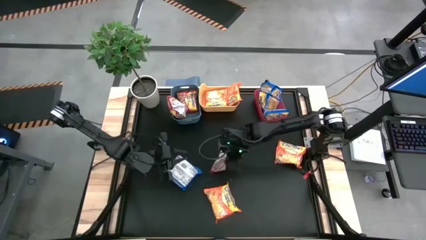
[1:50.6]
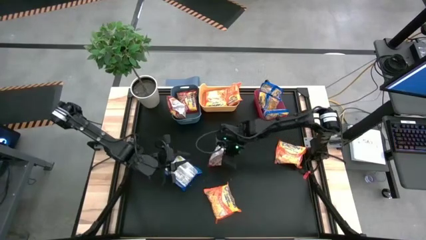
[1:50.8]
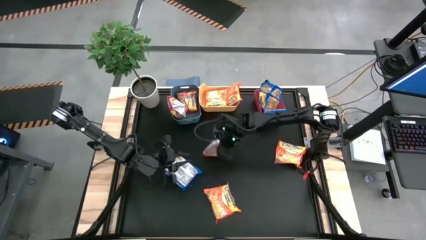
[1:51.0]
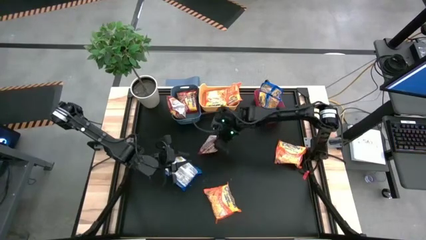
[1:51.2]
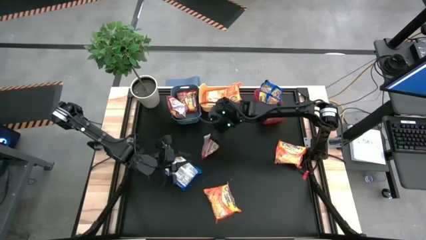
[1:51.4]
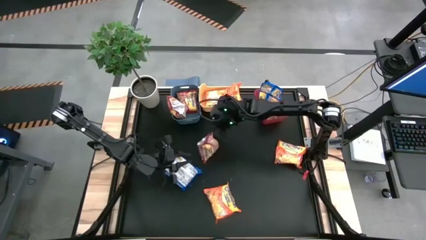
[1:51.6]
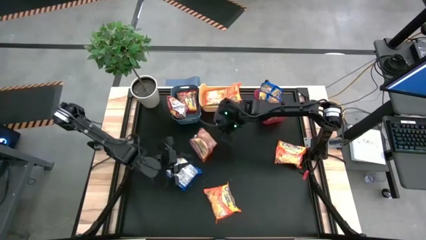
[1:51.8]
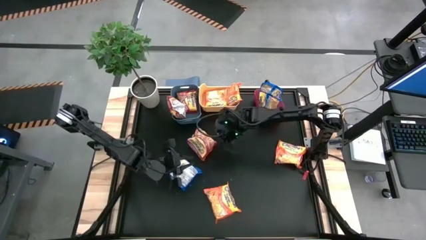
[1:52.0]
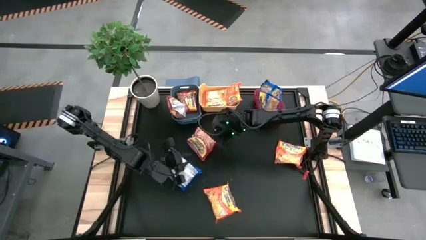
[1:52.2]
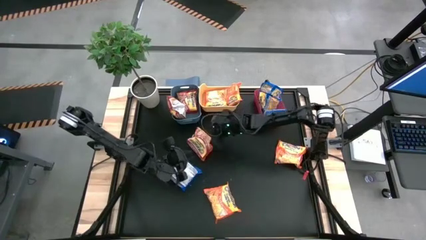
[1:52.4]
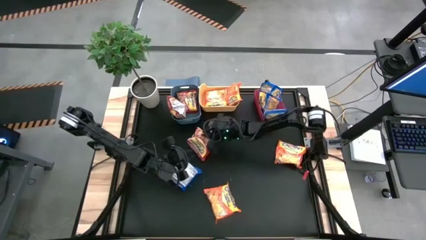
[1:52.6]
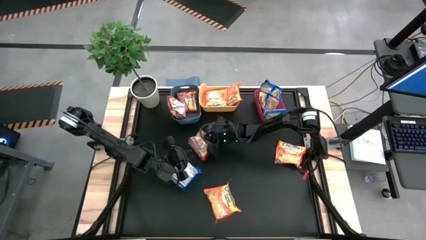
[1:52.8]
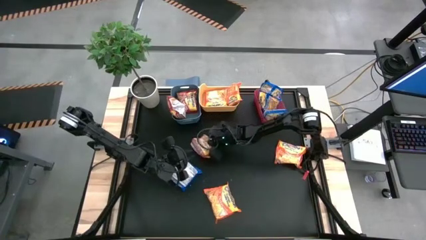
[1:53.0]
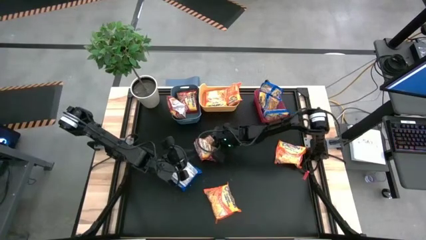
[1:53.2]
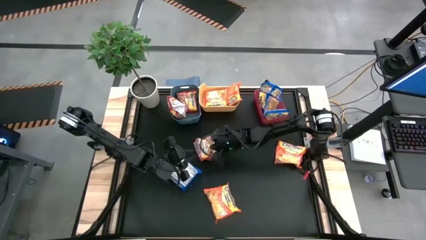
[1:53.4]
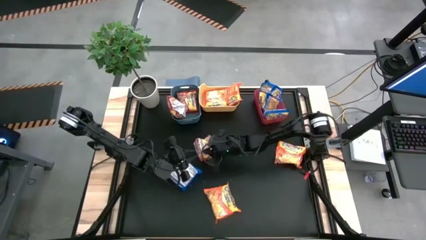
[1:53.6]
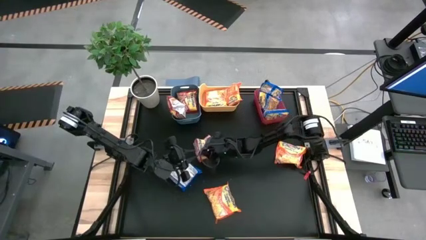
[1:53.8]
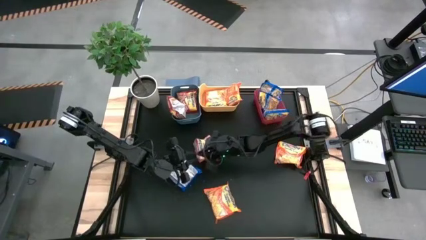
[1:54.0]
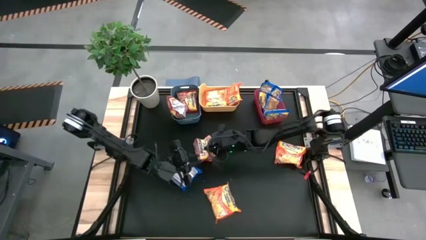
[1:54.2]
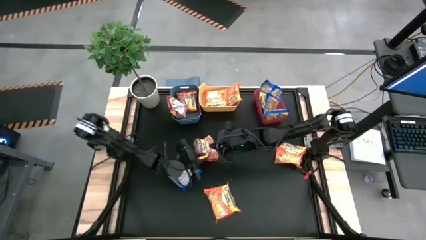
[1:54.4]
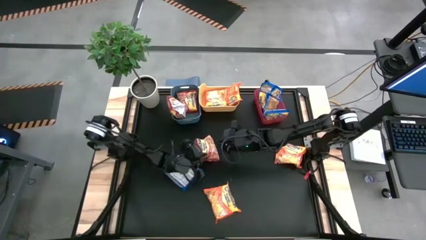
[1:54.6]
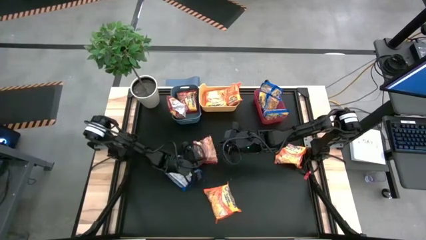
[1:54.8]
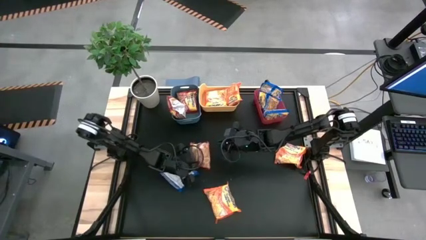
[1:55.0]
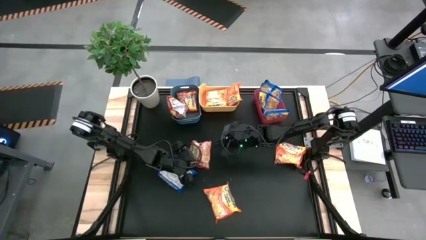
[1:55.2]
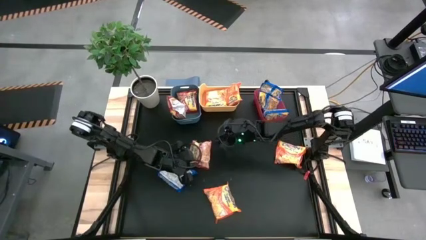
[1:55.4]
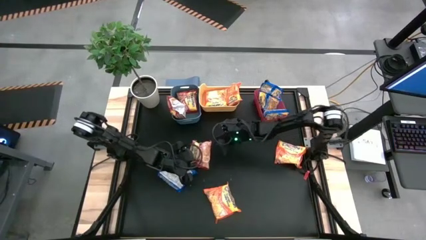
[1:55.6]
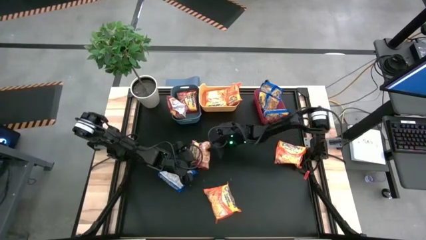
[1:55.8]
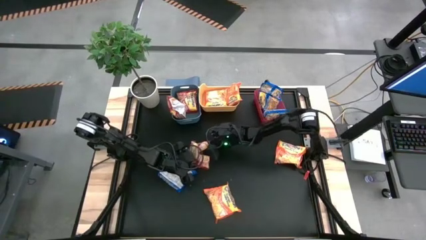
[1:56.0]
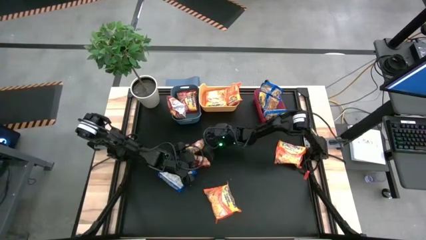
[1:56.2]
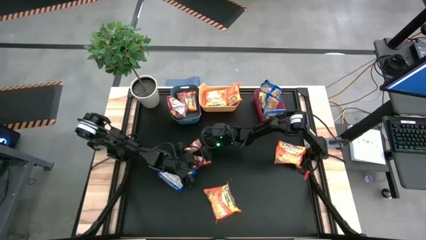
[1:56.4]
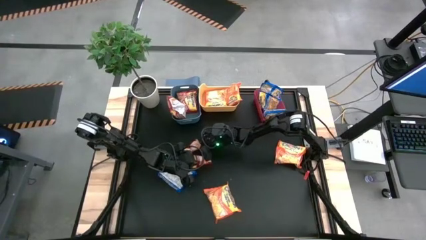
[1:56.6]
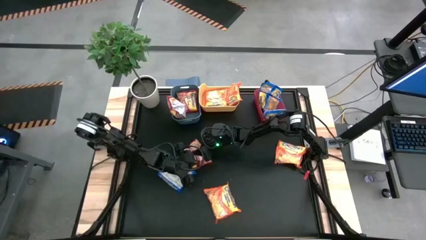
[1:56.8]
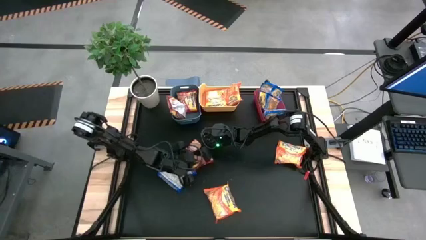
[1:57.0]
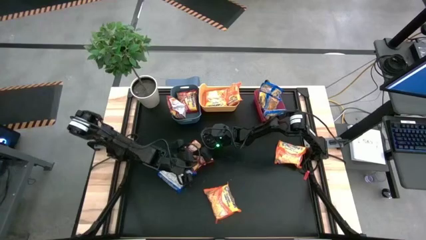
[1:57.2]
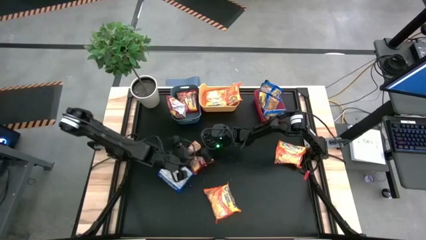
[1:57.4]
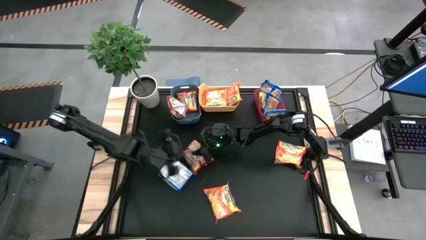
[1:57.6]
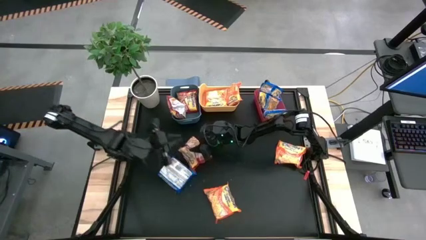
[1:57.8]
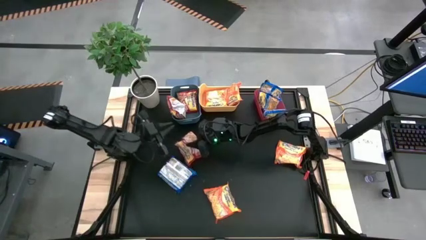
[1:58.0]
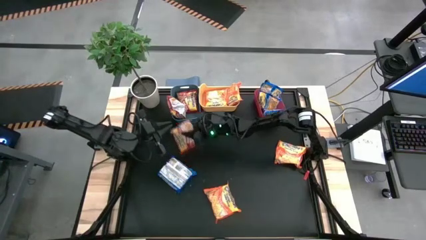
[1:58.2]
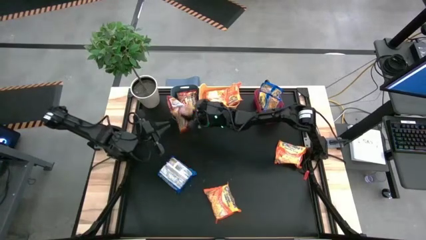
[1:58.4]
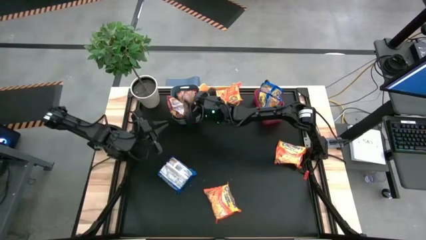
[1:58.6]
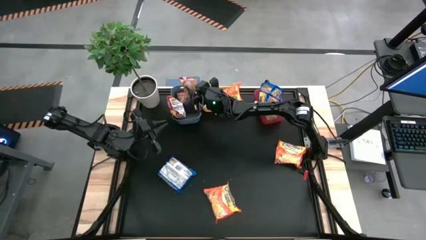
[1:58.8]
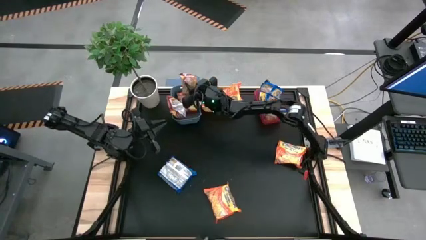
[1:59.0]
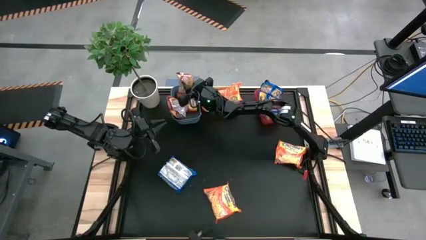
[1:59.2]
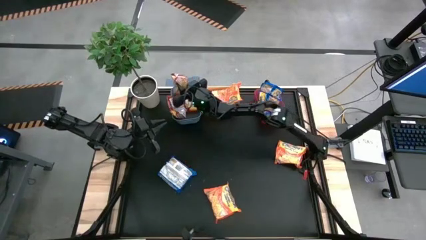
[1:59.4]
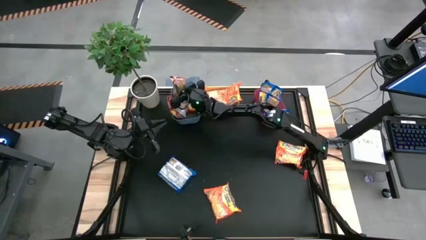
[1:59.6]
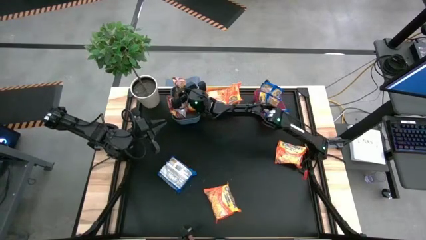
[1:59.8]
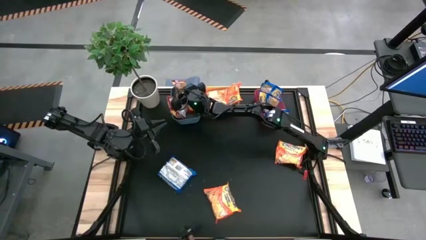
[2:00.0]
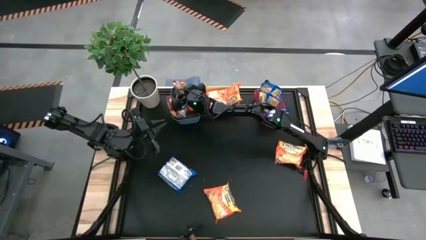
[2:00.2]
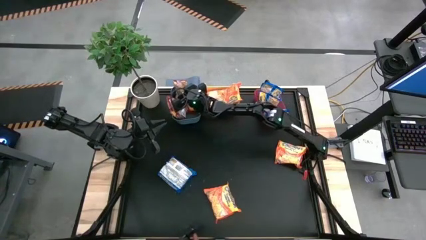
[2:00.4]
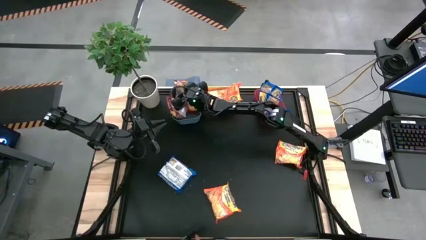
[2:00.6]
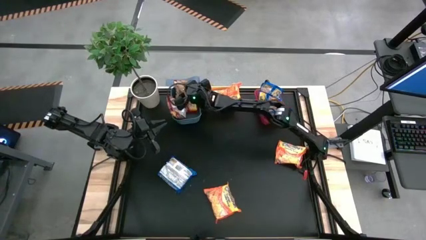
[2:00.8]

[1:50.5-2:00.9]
Task: Sort Maruchan noodles
Put the red noodle pack into the blue bin

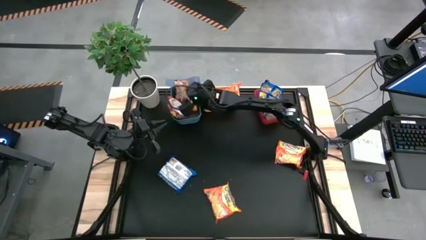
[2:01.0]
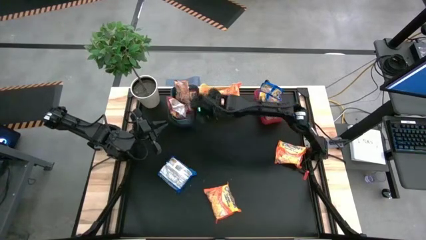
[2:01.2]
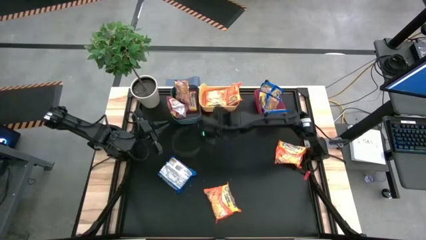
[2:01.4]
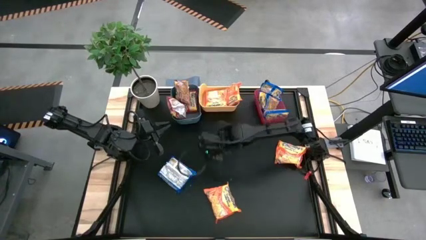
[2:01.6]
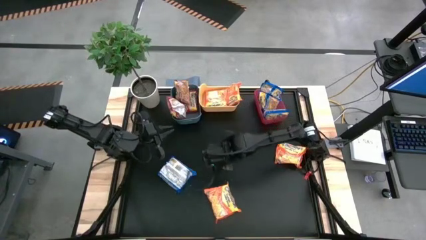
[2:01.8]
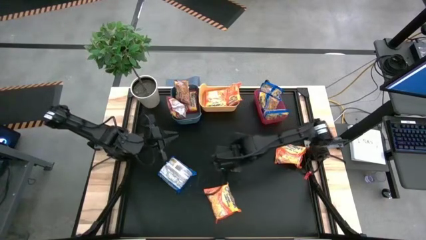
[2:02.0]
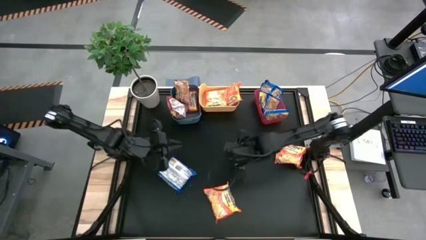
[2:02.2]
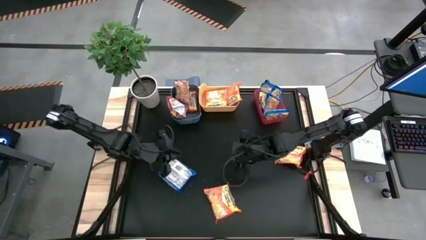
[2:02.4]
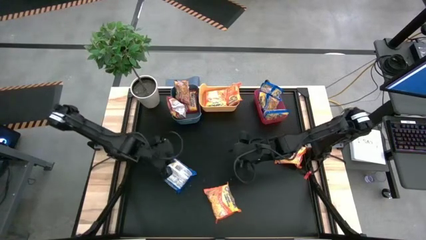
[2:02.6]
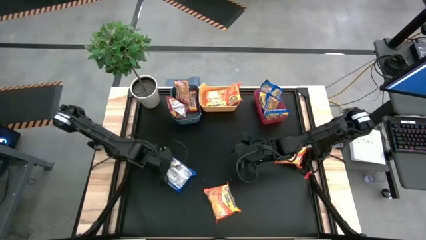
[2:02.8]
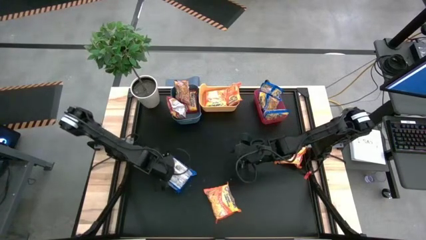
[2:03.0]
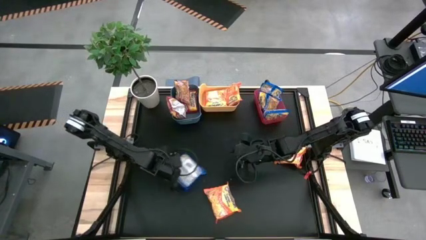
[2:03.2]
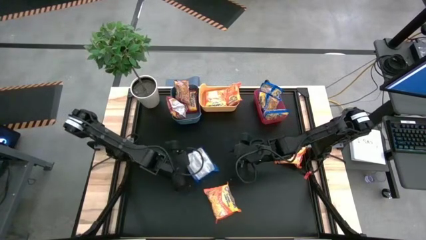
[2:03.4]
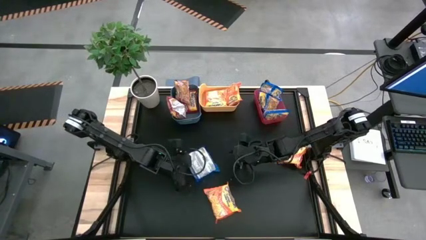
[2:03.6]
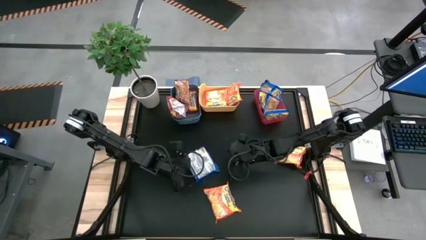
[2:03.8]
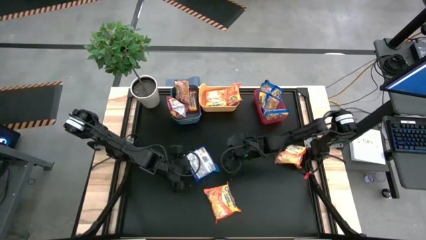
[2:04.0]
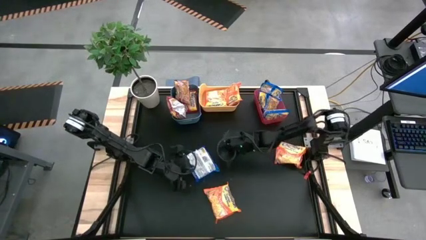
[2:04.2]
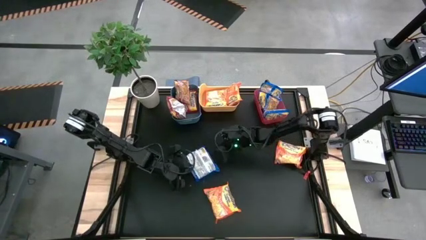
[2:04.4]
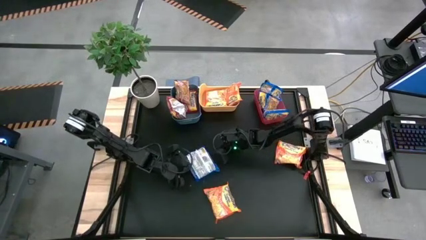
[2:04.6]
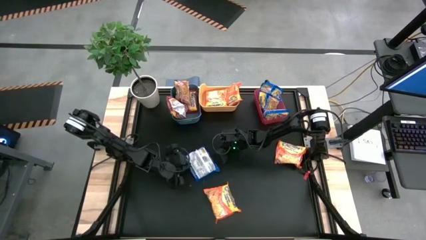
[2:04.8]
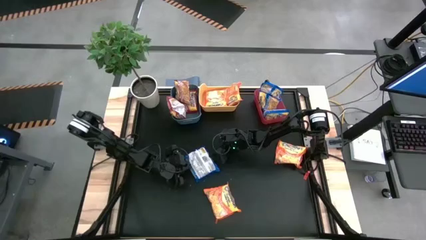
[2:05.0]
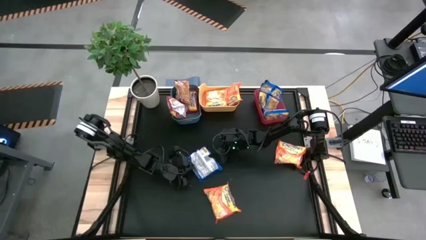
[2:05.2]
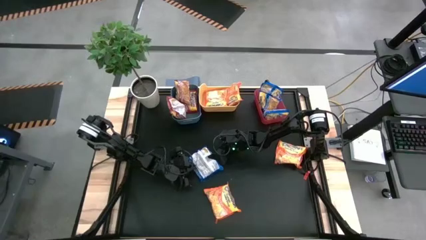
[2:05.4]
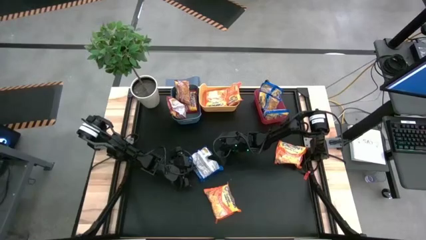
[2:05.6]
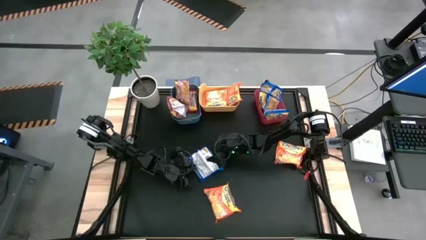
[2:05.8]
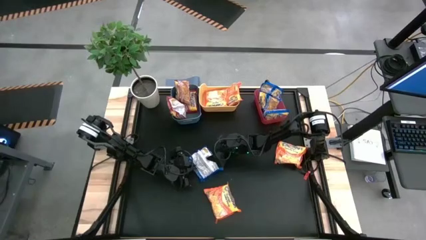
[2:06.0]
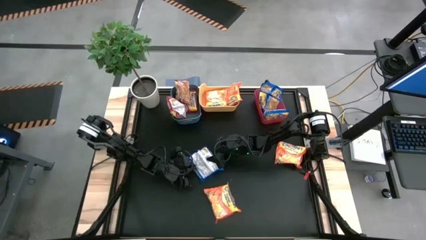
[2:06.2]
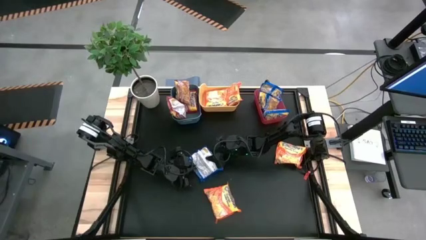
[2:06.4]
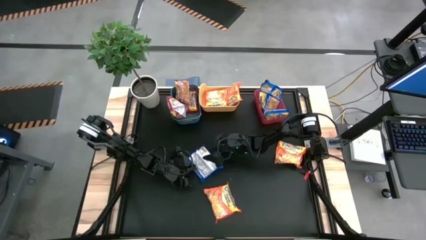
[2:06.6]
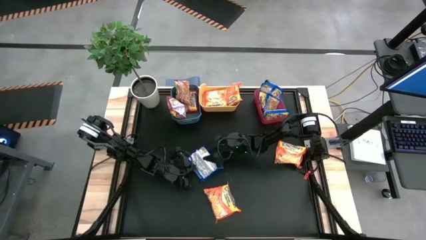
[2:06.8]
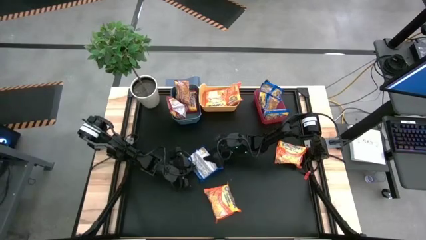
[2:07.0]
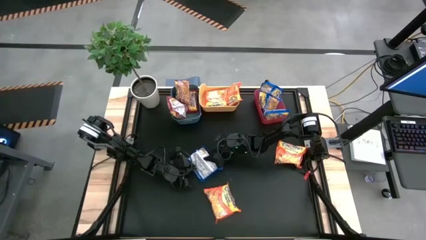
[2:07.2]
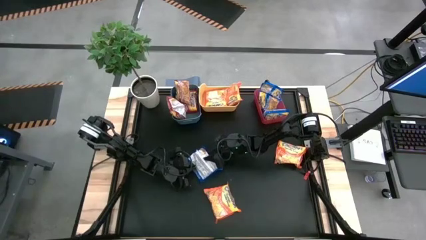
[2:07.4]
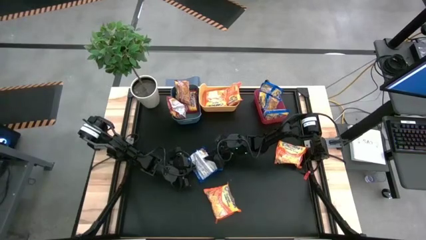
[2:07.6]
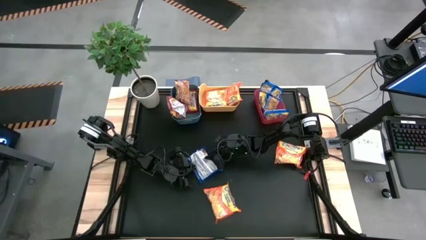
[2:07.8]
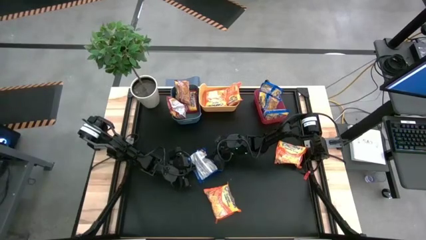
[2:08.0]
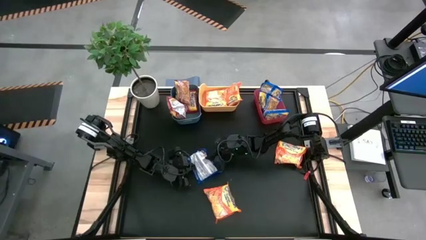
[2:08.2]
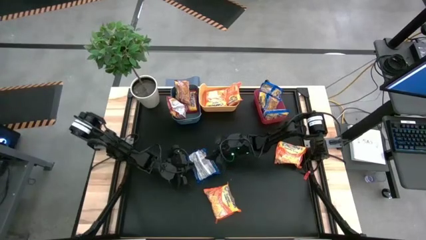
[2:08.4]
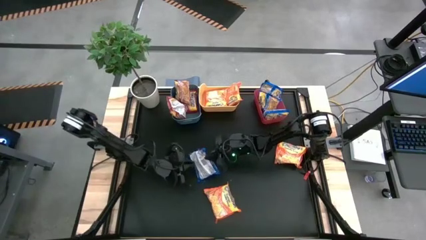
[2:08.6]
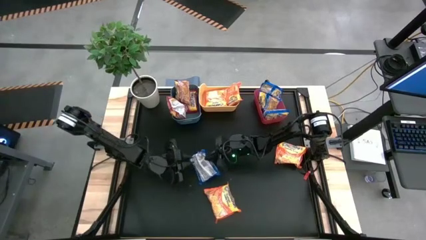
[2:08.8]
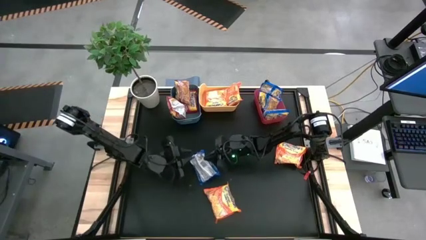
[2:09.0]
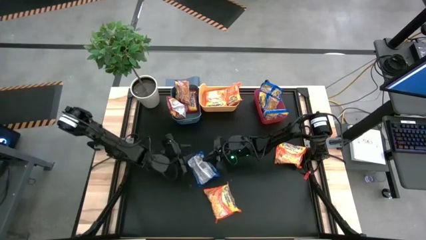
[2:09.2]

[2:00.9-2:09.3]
Put the blue noodle pack into the red bin
